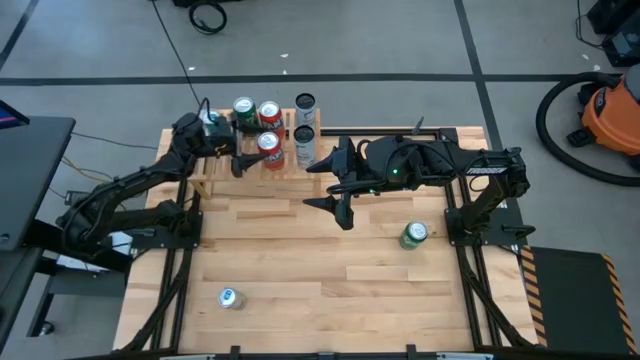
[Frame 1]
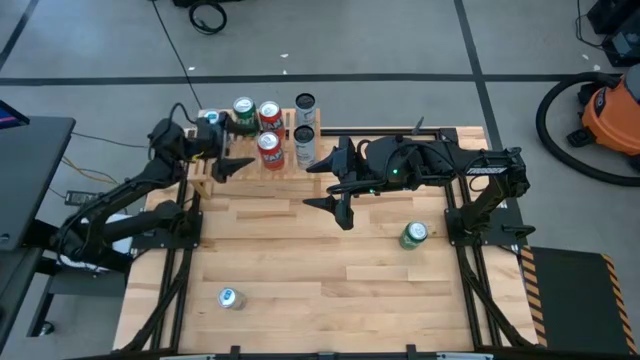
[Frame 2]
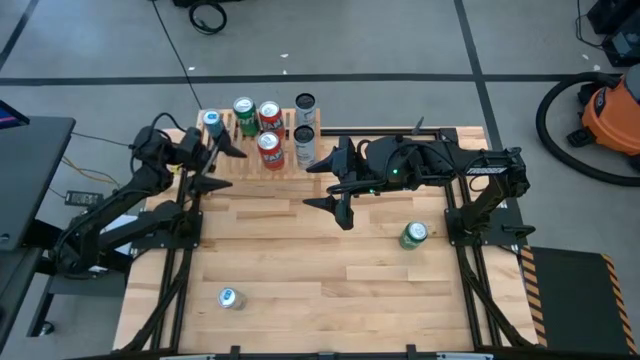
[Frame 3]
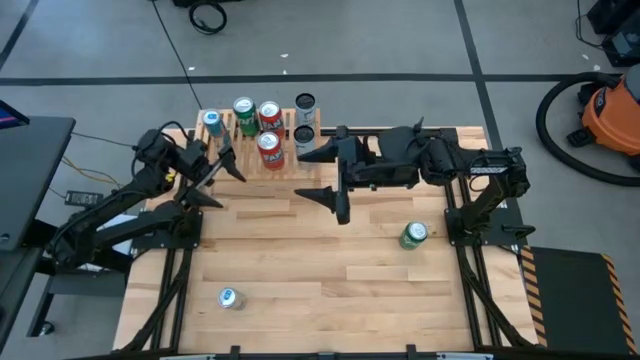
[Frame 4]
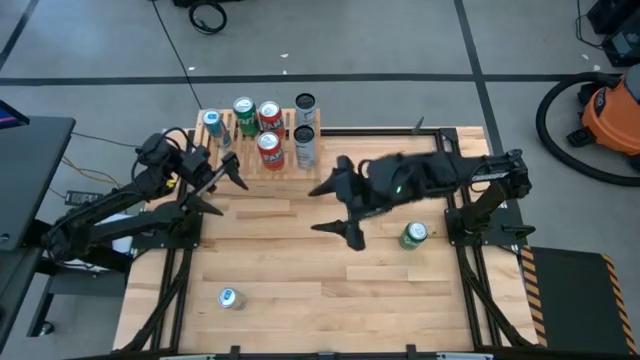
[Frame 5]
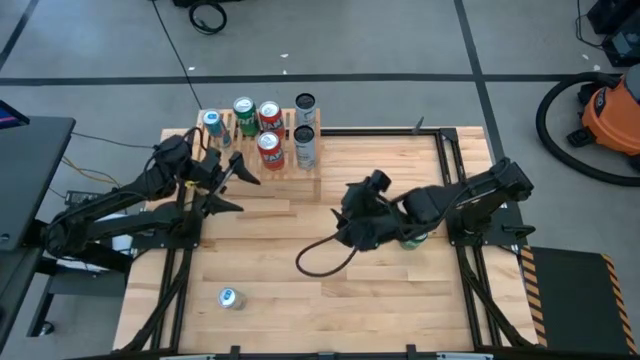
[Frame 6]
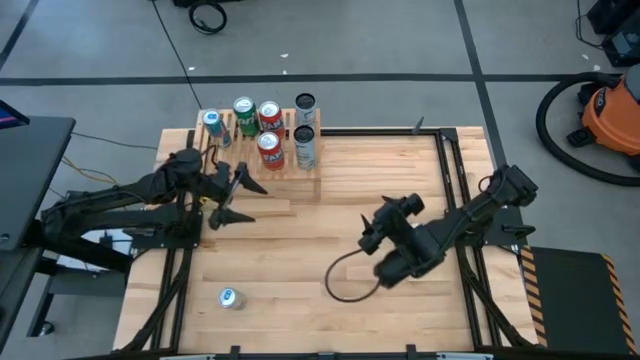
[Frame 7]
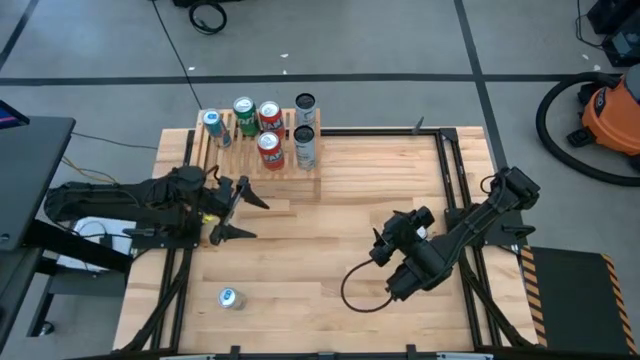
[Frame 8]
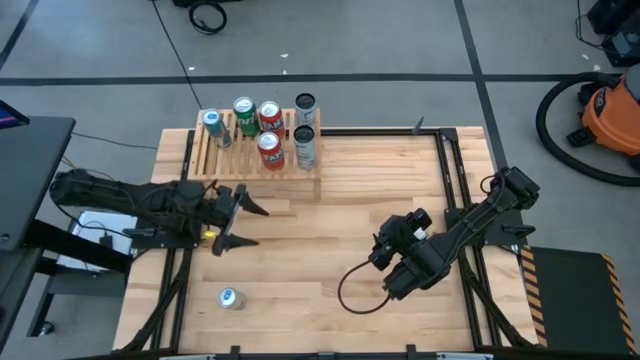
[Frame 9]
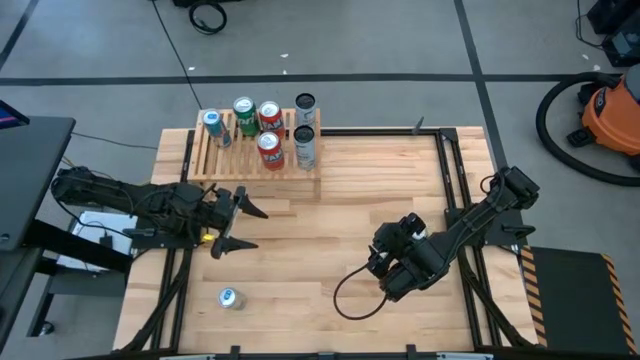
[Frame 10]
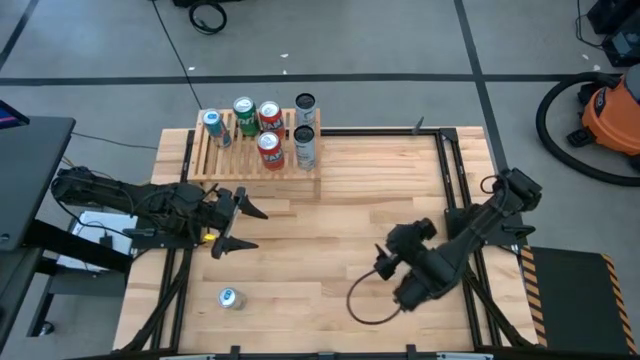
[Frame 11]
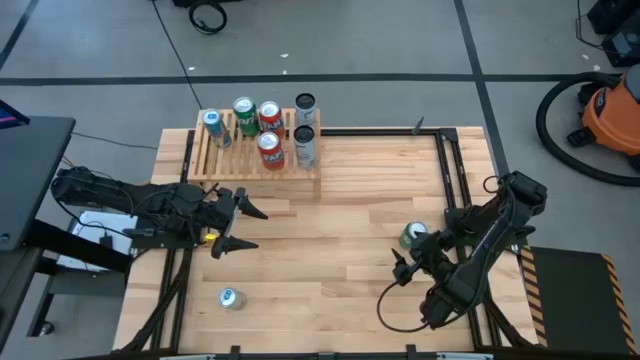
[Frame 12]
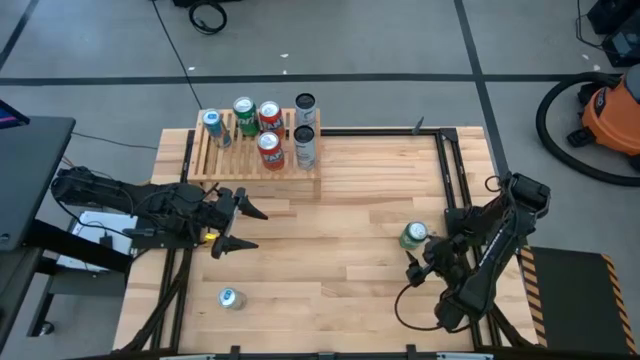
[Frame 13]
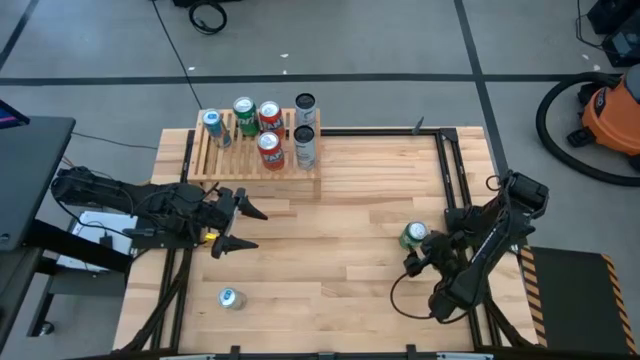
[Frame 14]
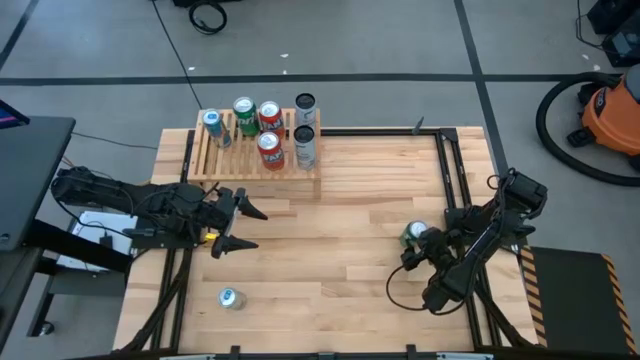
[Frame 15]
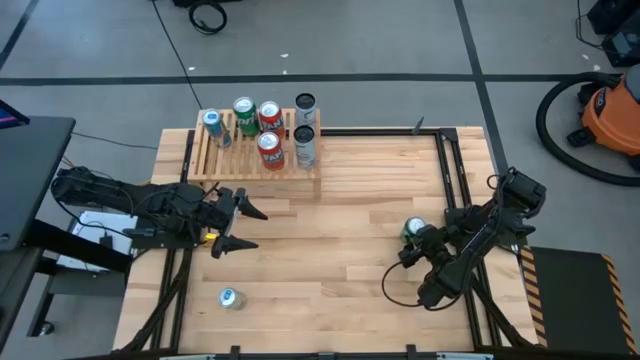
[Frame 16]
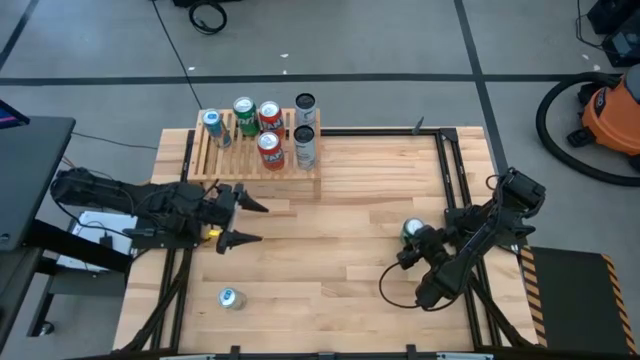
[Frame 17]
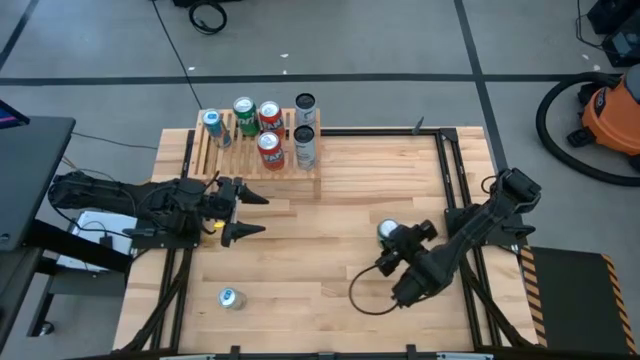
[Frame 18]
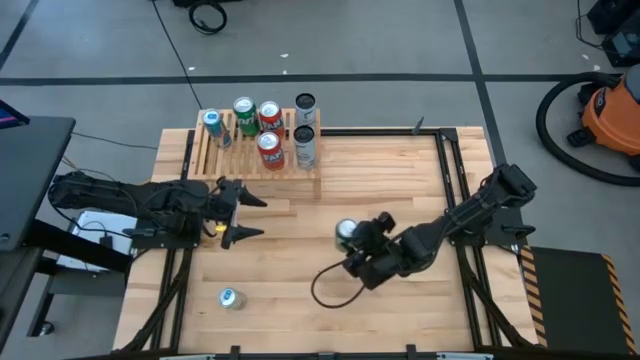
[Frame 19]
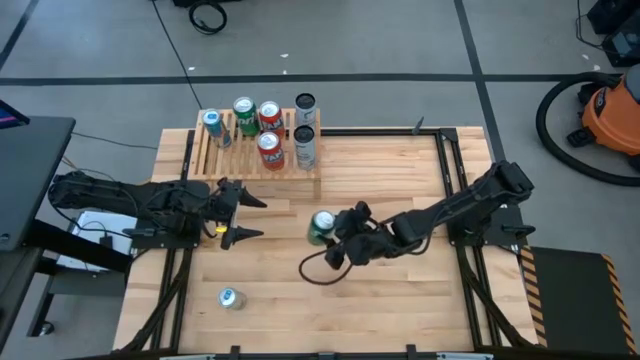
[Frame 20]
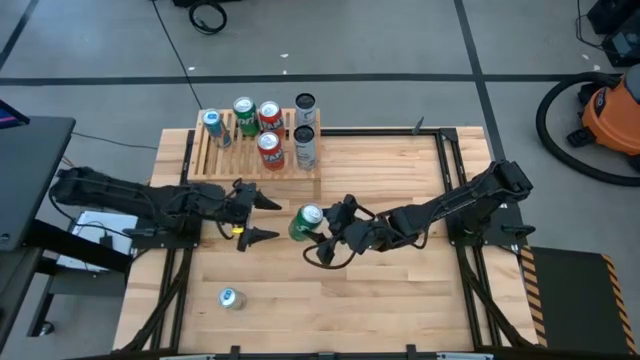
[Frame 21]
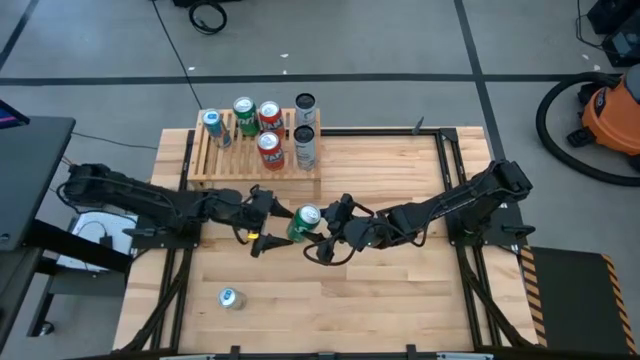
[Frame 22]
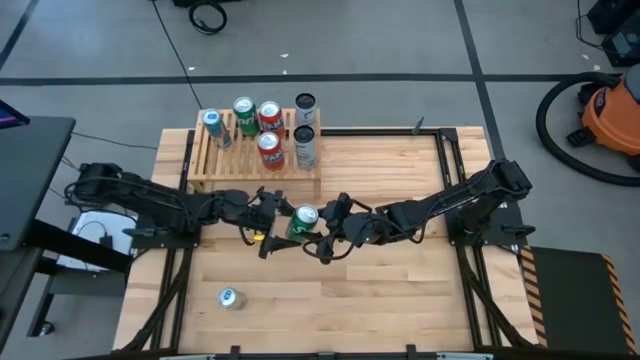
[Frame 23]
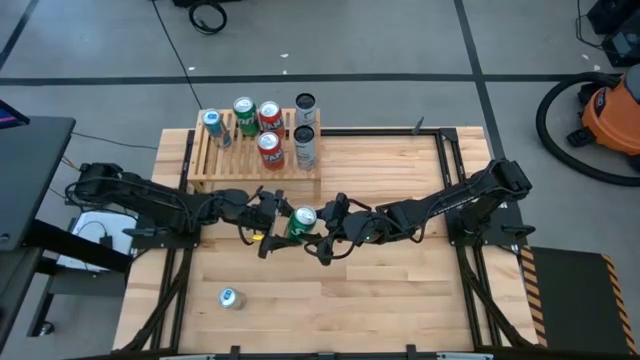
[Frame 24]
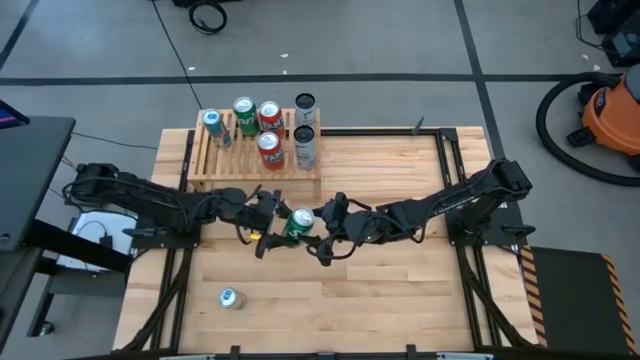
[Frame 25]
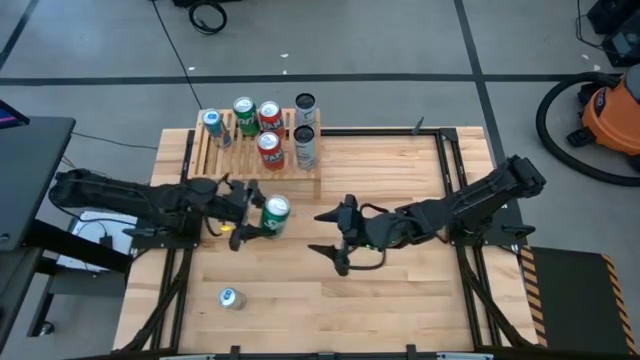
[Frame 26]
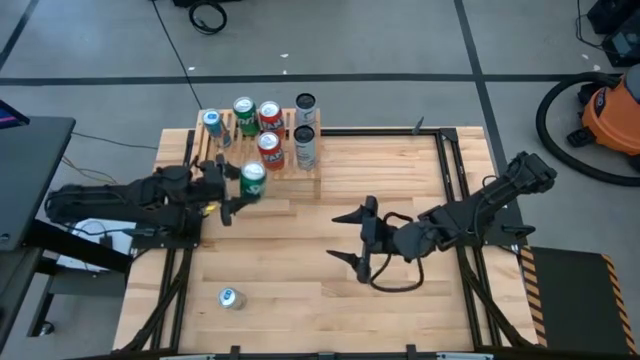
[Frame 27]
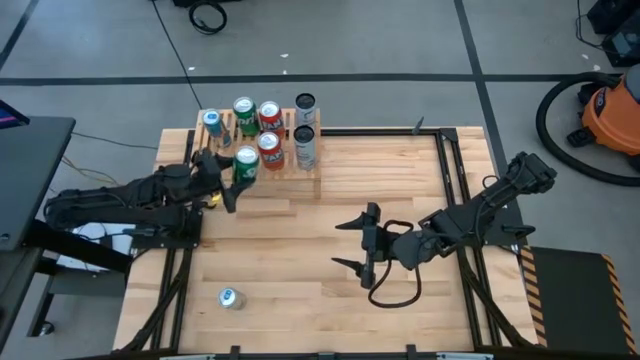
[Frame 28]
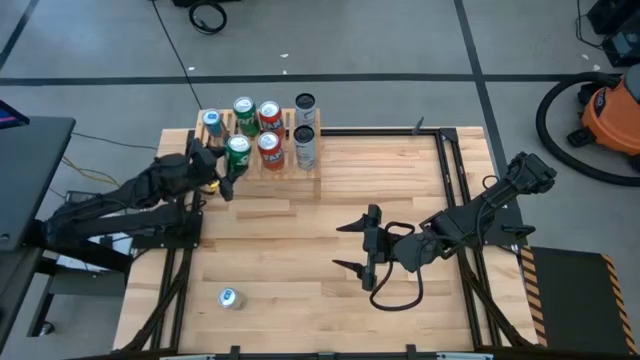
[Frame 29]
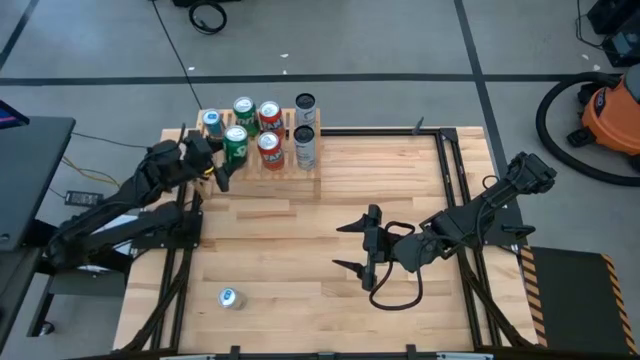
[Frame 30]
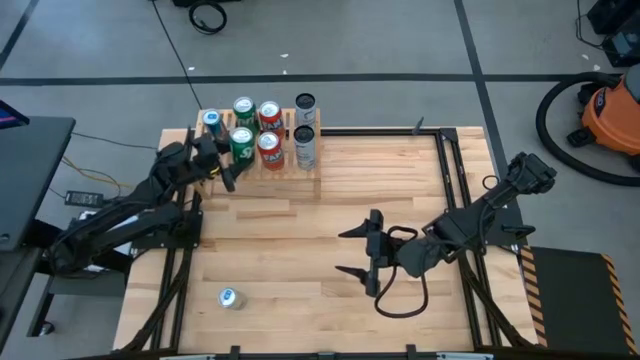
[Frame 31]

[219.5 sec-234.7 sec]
Task: Place canned beverage on shelf
Put the green soda can on the shelf

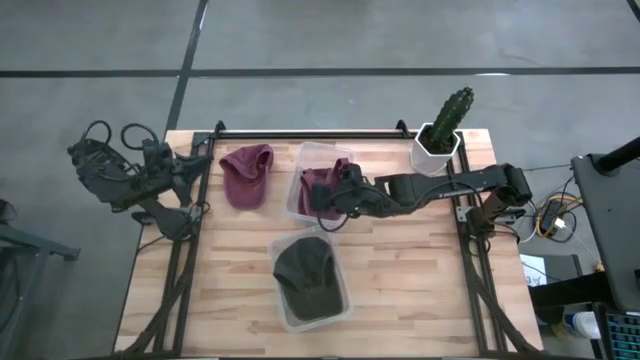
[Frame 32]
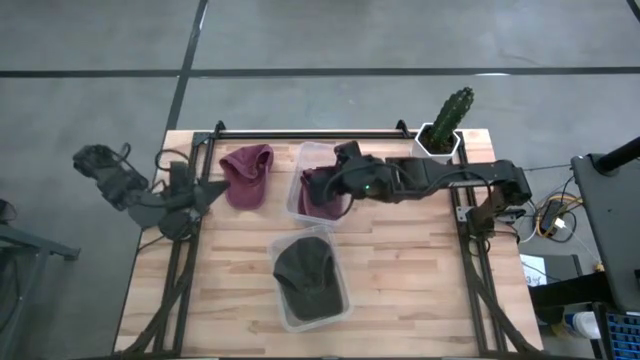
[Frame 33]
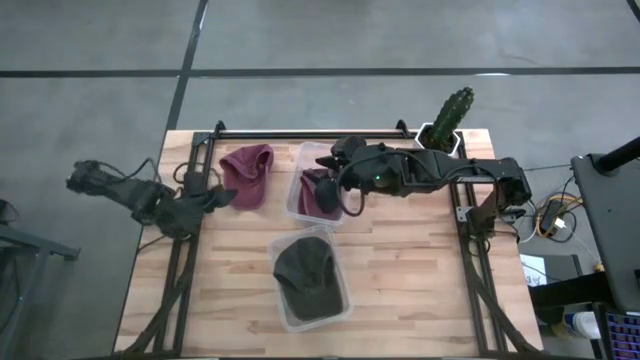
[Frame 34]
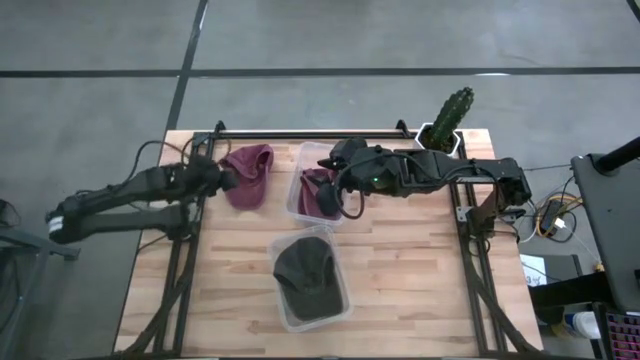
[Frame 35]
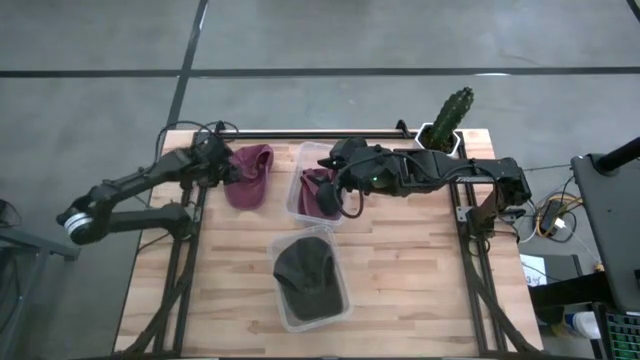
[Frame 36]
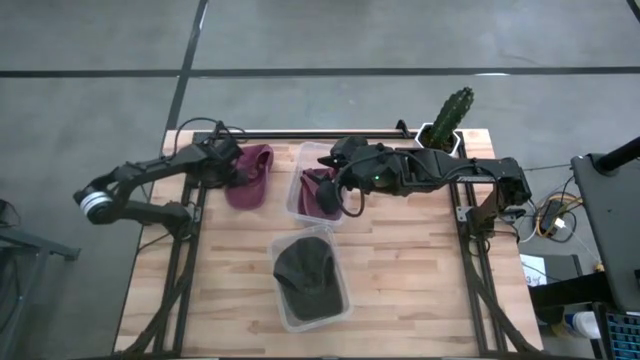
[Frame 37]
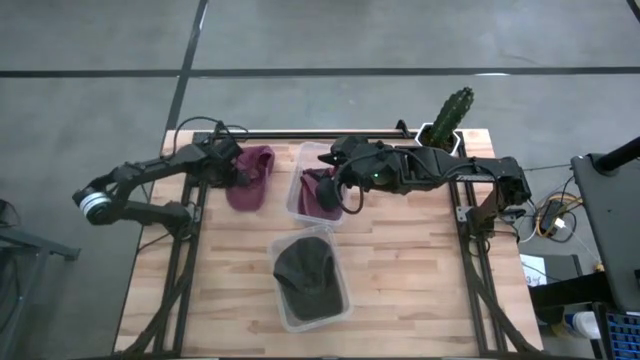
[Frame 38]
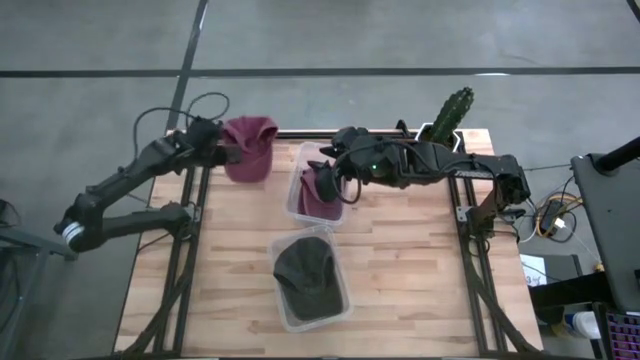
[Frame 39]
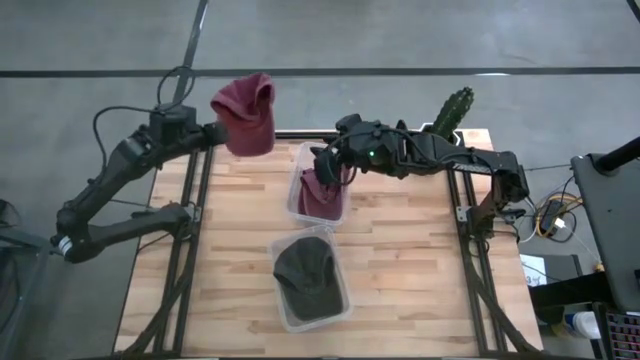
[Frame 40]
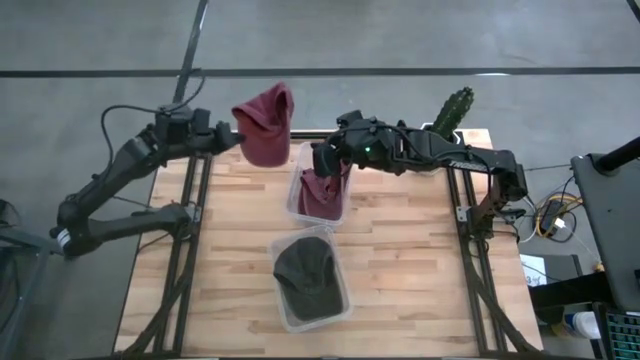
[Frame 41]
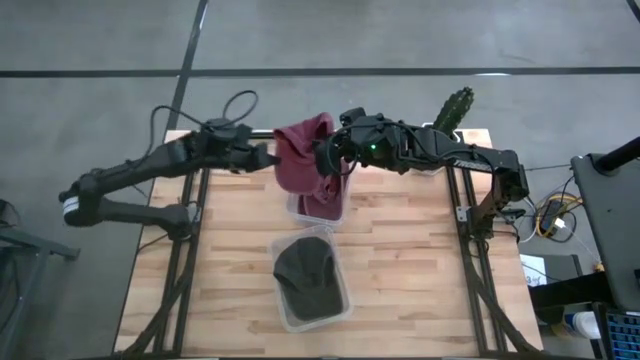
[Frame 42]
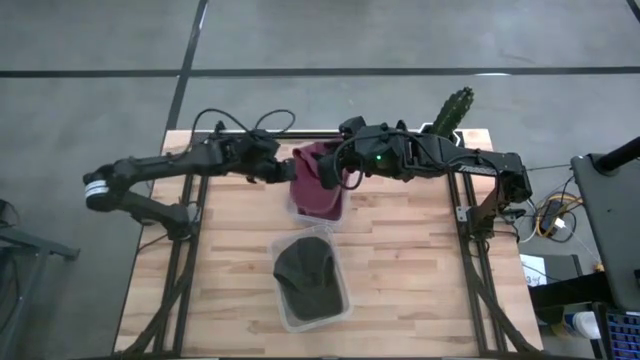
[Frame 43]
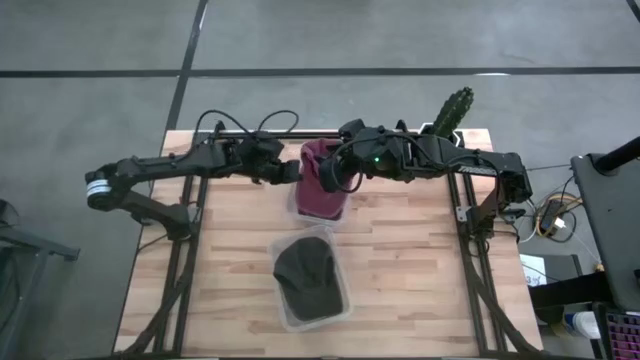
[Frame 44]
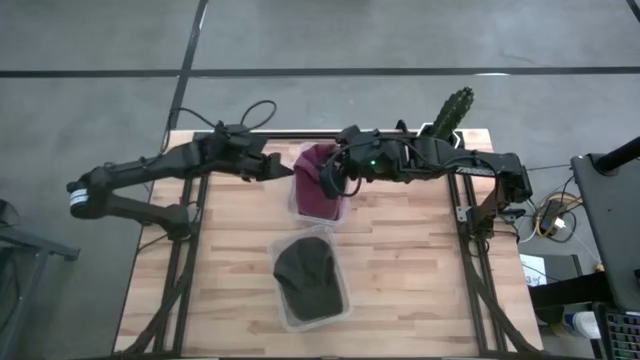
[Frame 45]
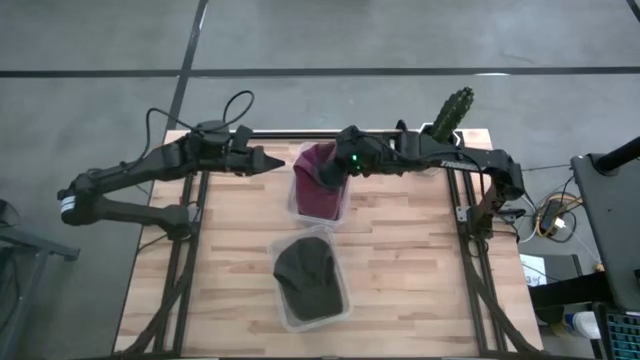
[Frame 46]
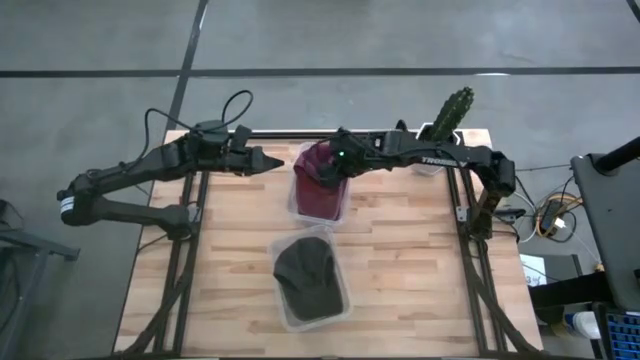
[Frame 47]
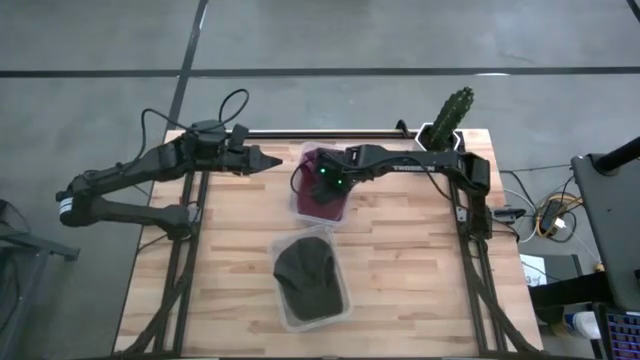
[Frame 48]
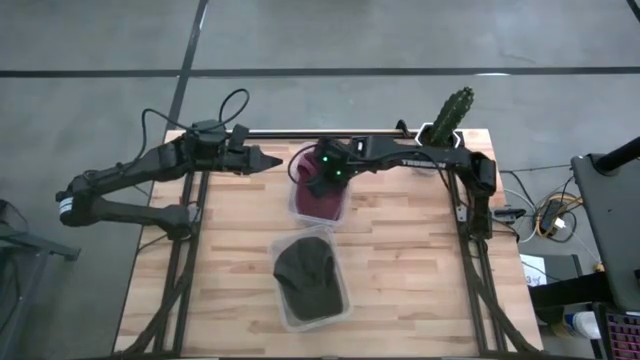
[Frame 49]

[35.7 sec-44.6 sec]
Task: Pick & Place hat
Put the red cap into the top transparent bin
